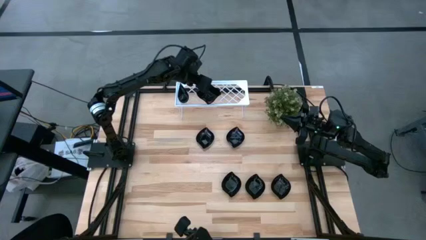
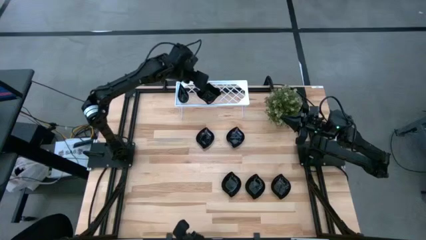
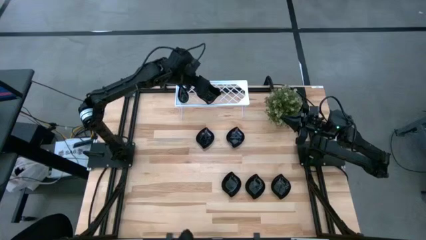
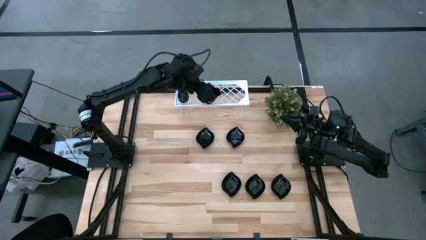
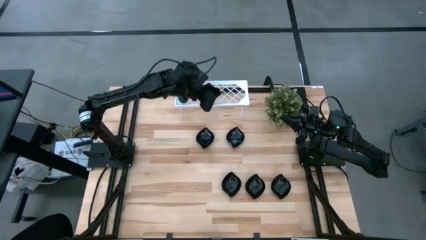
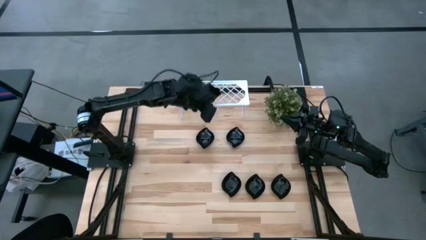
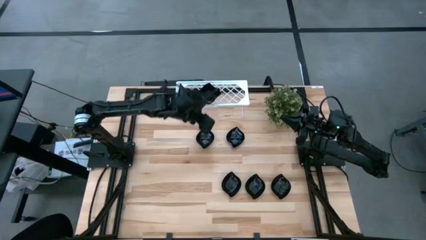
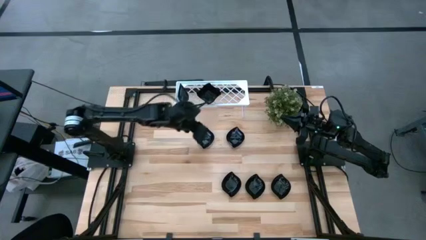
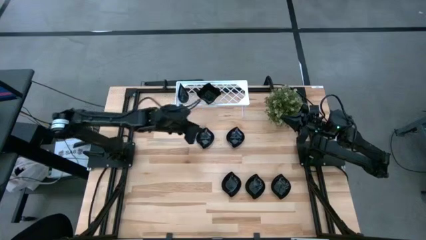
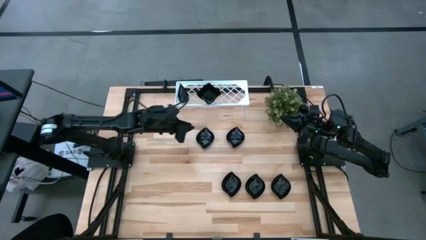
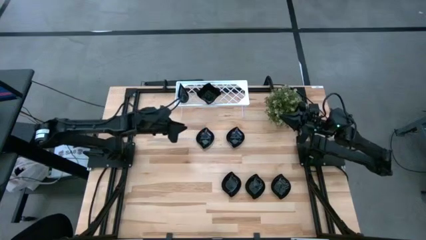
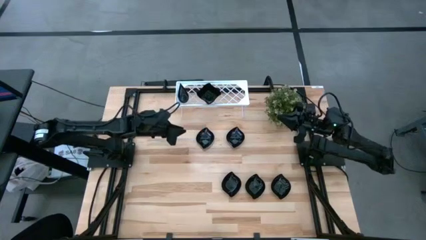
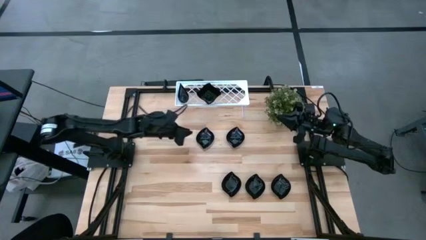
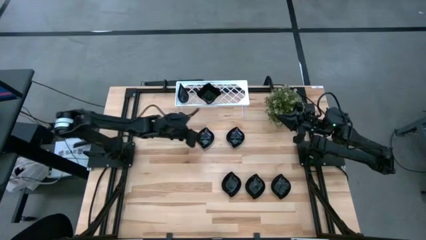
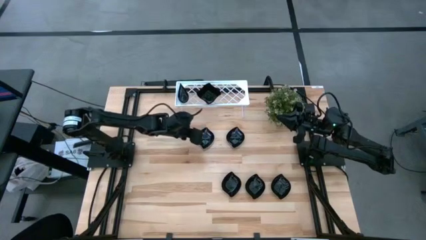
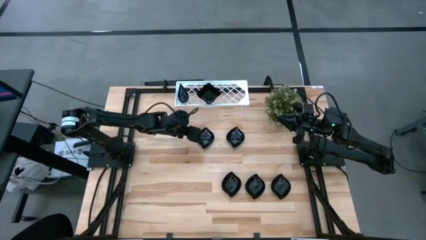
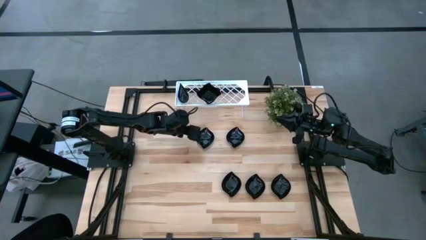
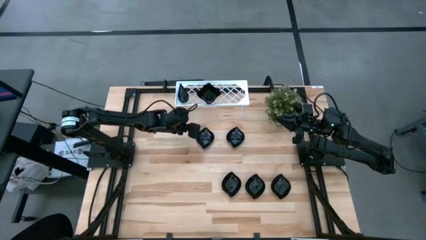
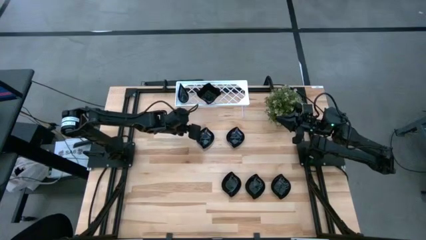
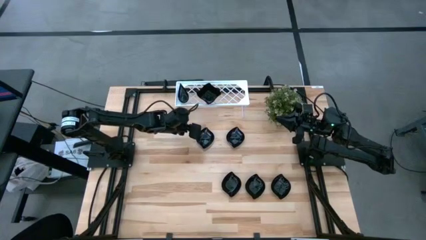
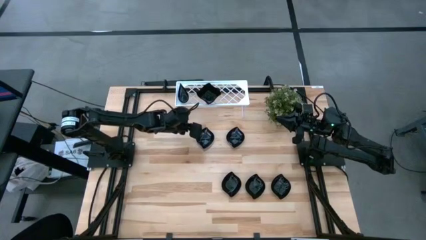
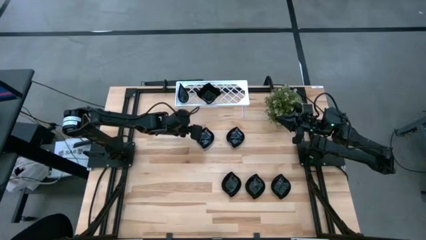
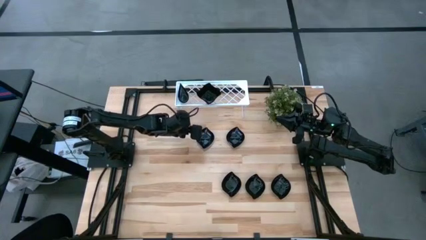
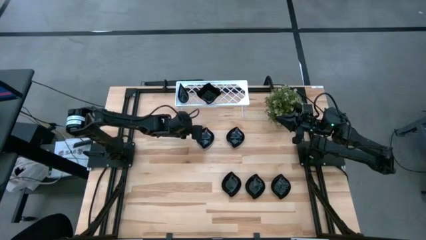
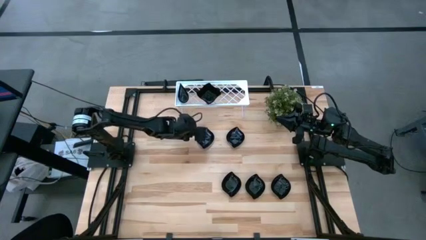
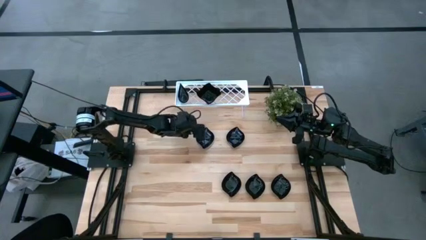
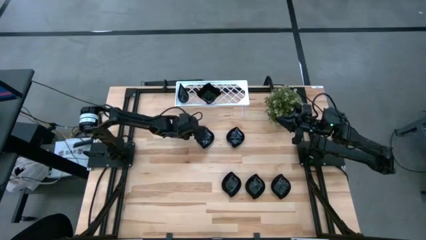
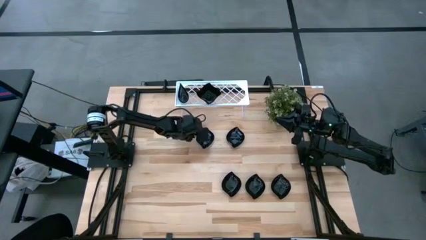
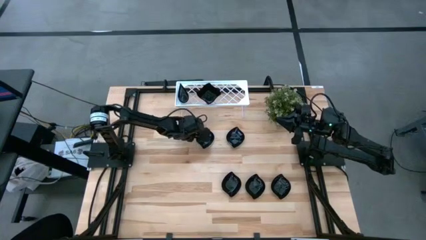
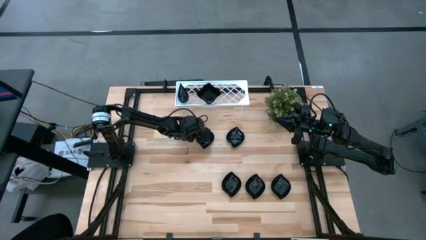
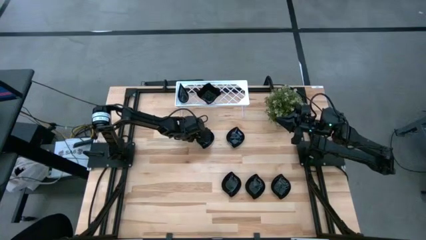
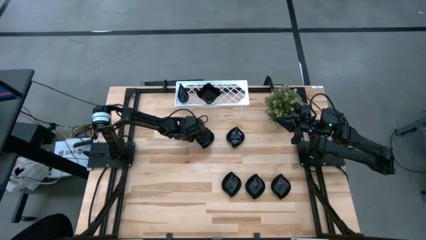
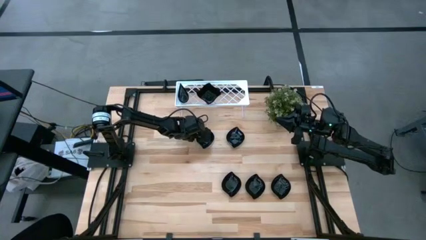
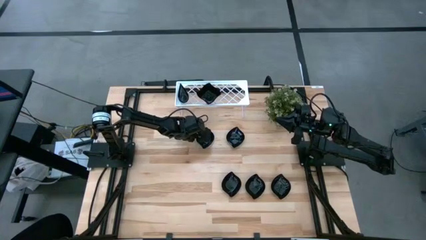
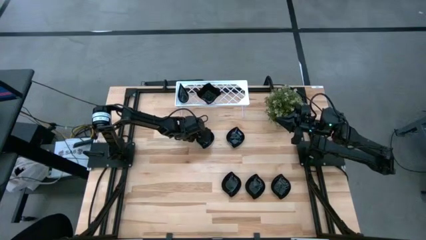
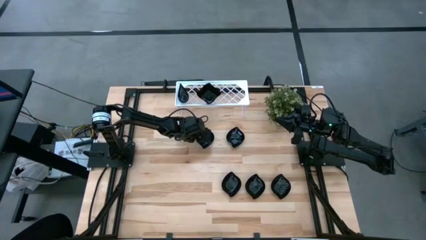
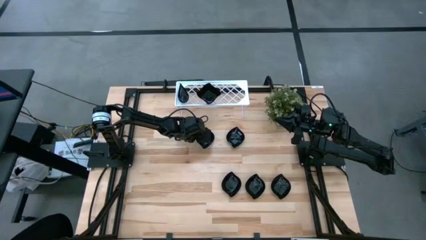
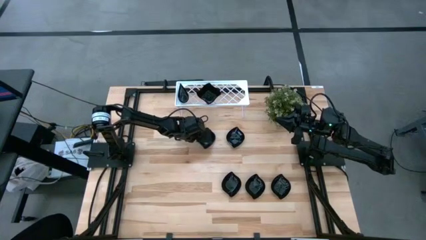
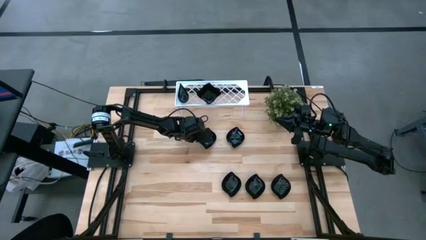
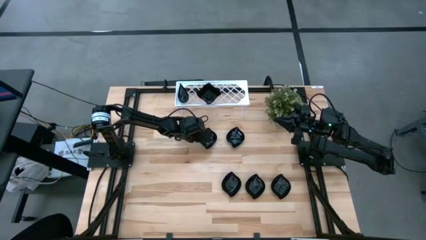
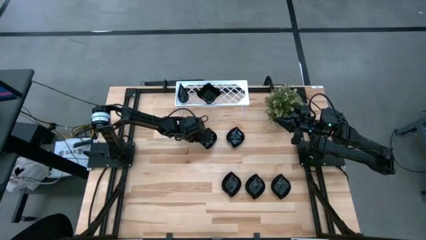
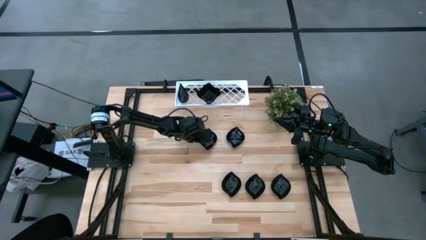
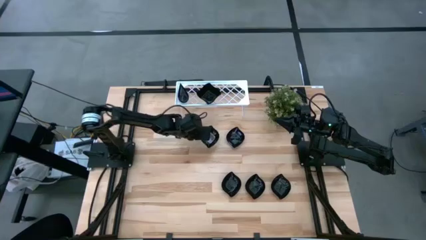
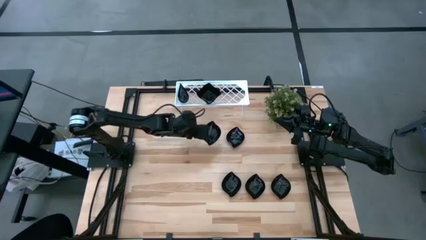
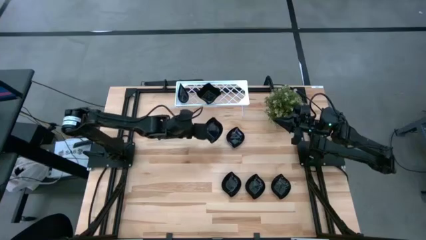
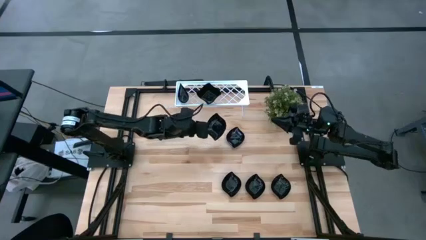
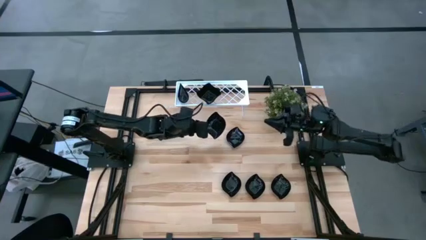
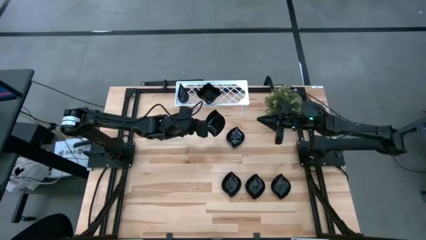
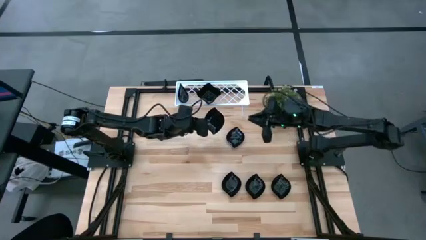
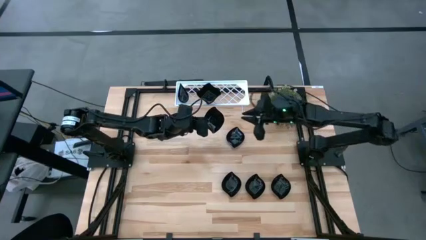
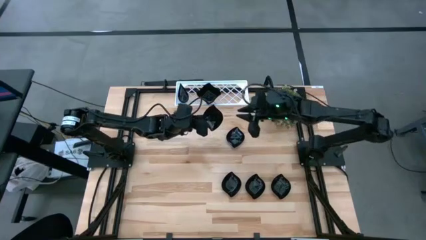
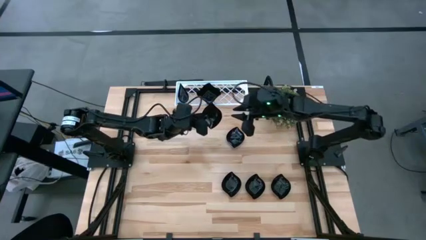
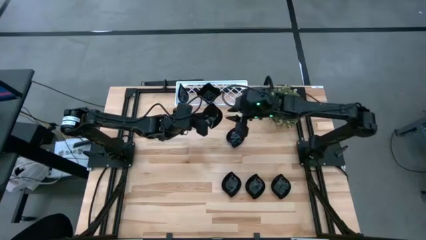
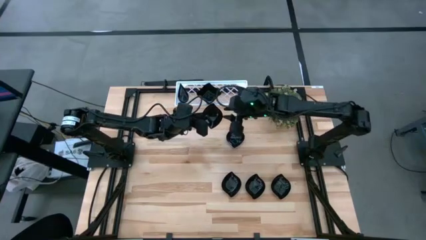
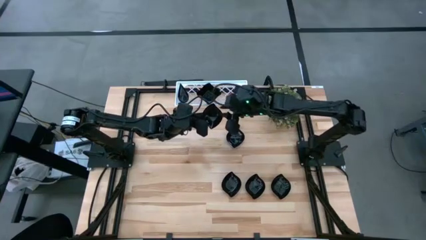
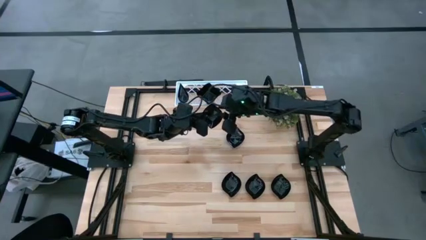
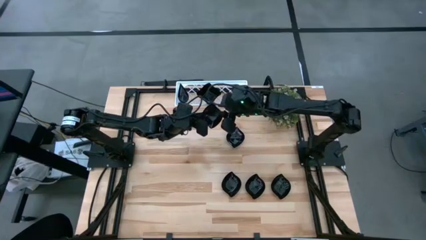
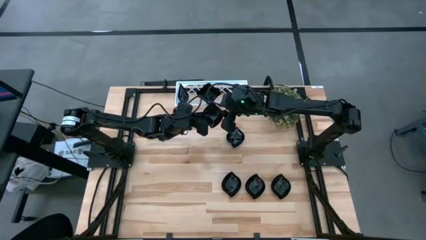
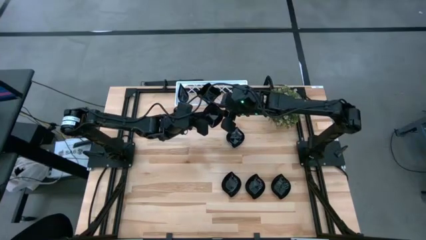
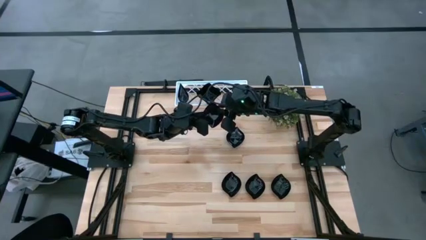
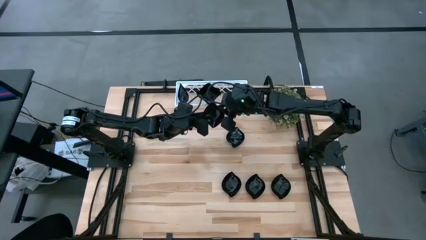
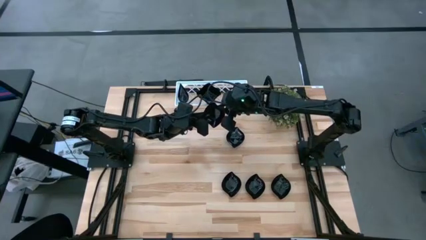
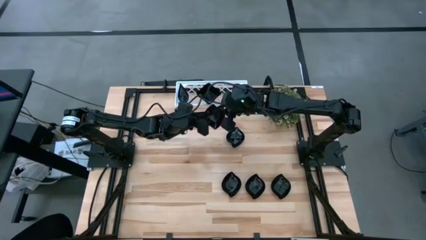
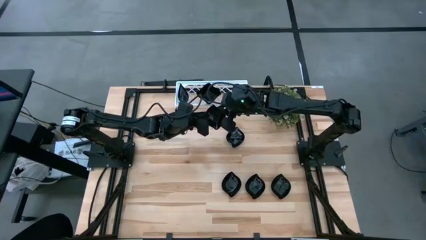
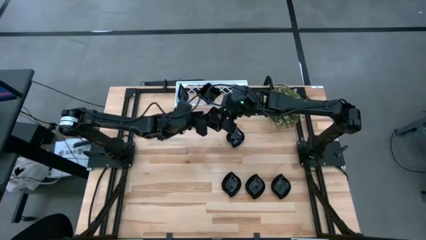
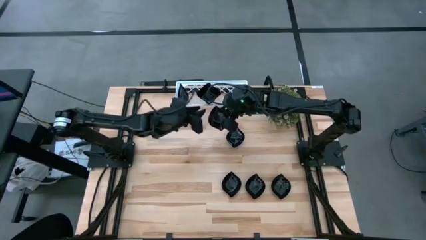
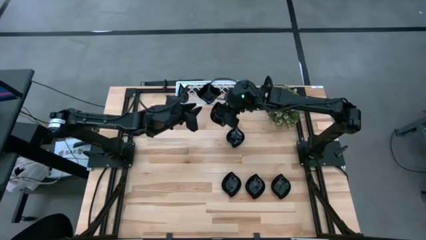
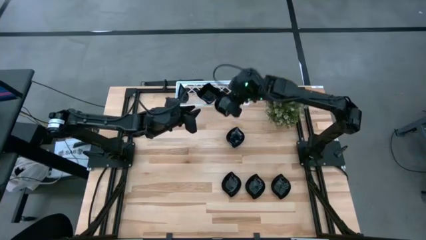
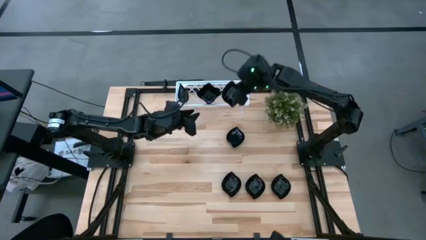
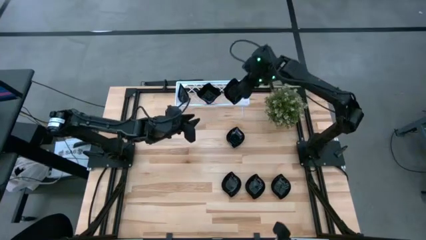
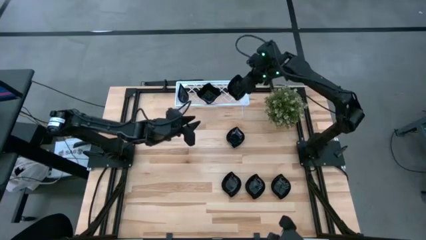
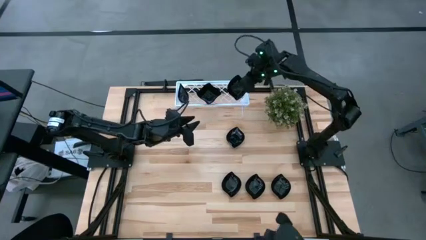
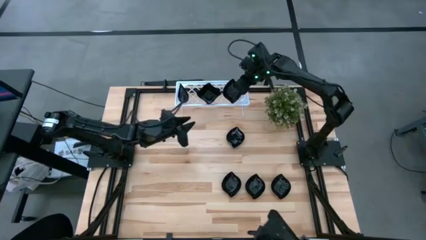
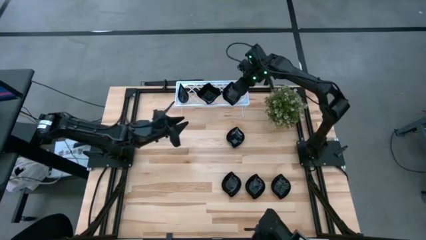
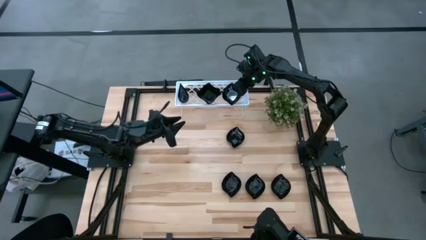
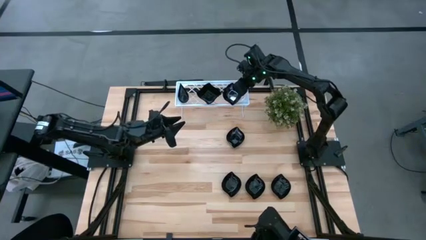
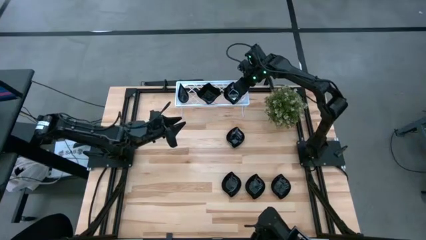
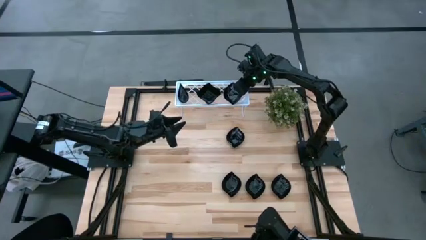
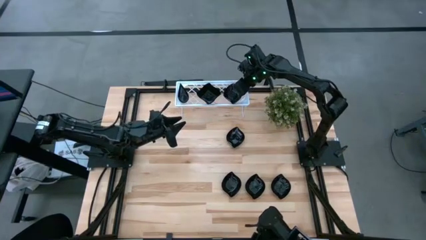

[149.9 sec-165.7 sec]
Task: Pick & Place Mini shaped plates
Put the leaf-shaped plate on the shelf
